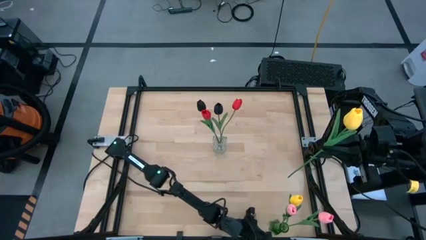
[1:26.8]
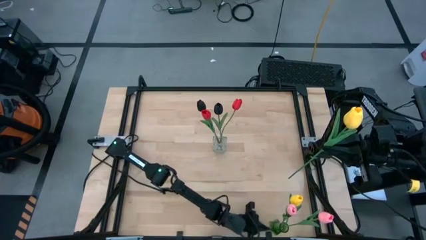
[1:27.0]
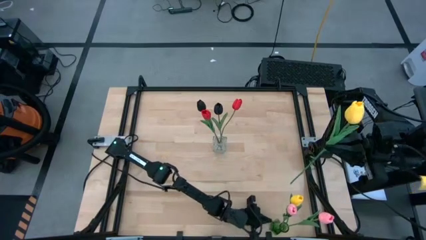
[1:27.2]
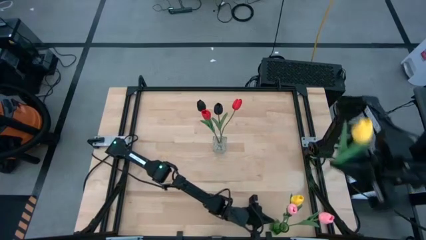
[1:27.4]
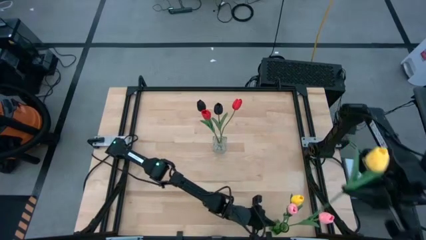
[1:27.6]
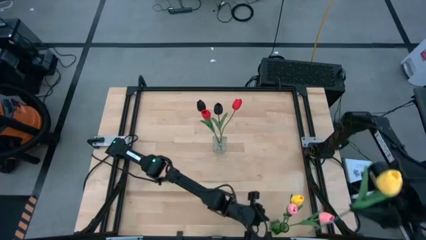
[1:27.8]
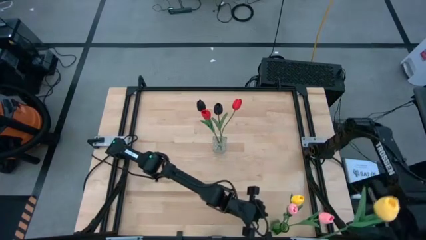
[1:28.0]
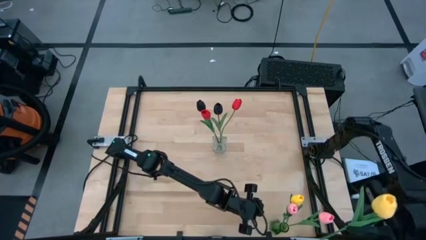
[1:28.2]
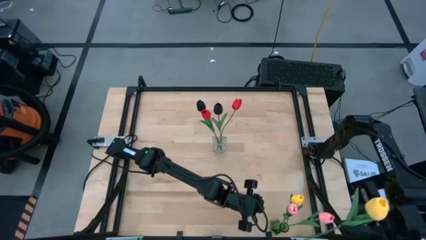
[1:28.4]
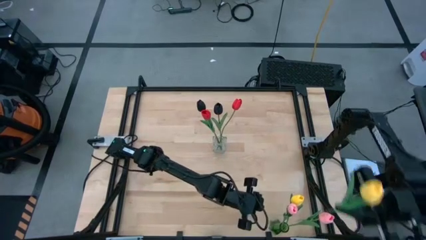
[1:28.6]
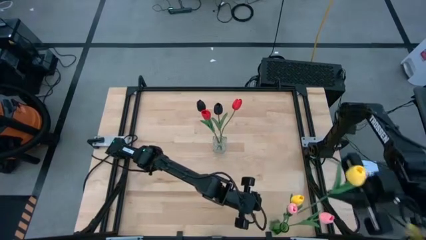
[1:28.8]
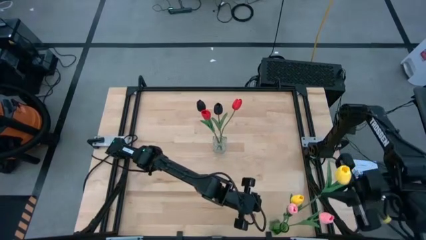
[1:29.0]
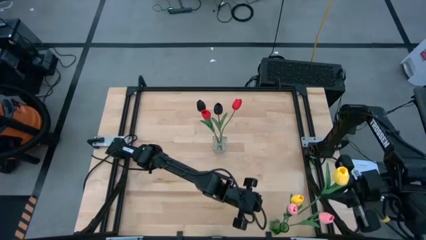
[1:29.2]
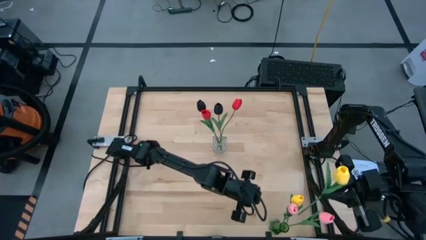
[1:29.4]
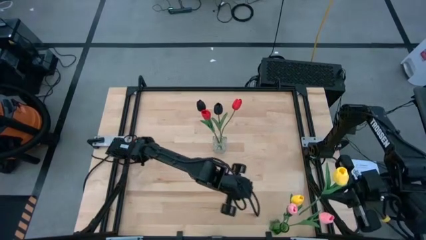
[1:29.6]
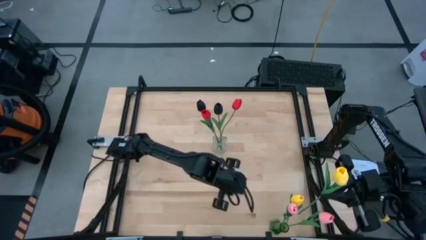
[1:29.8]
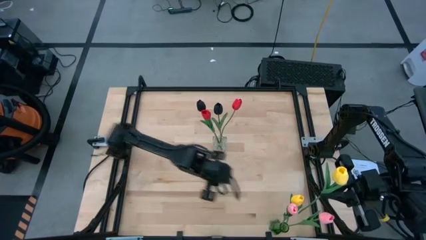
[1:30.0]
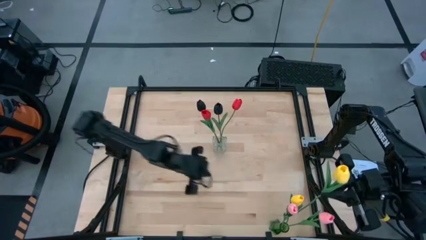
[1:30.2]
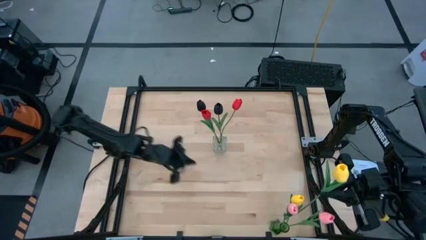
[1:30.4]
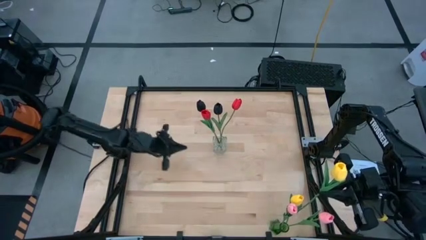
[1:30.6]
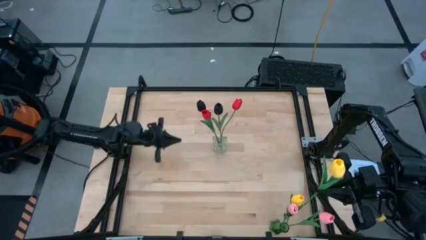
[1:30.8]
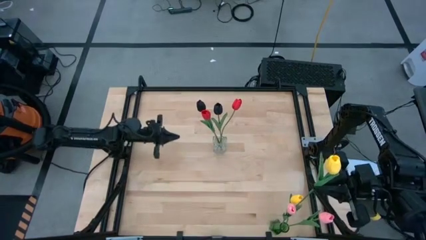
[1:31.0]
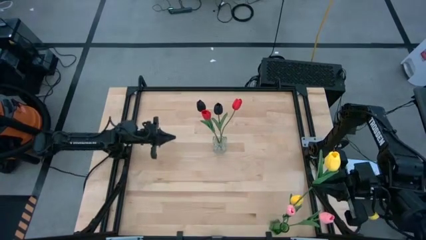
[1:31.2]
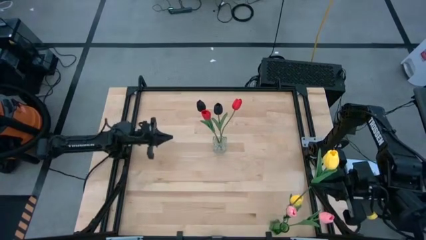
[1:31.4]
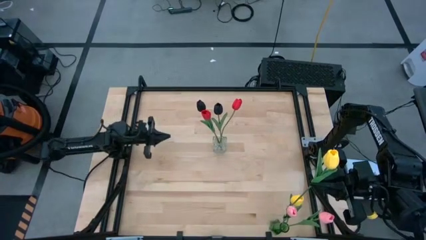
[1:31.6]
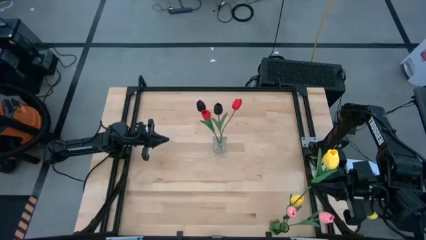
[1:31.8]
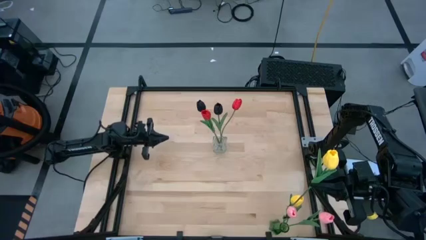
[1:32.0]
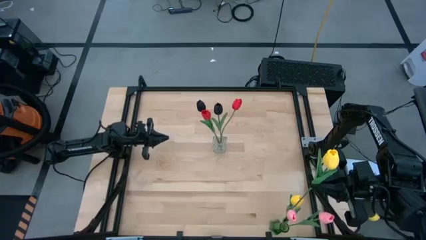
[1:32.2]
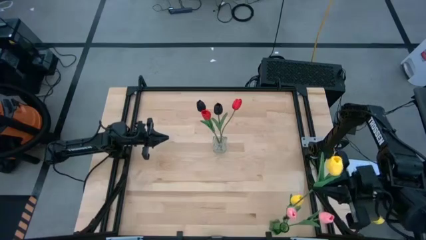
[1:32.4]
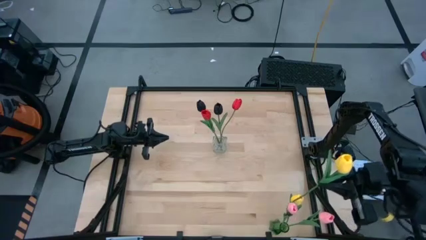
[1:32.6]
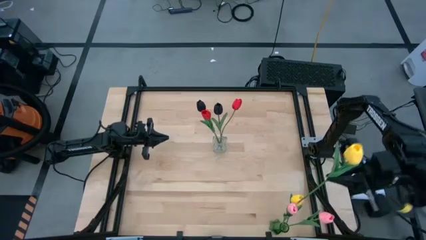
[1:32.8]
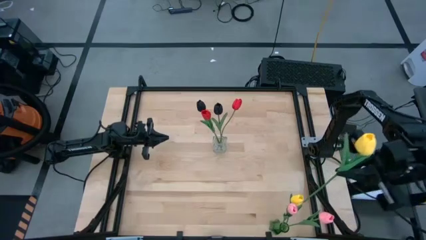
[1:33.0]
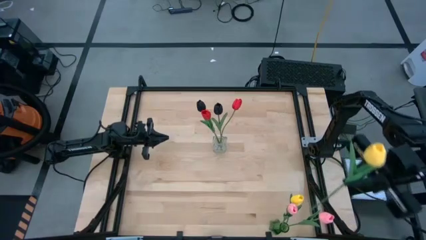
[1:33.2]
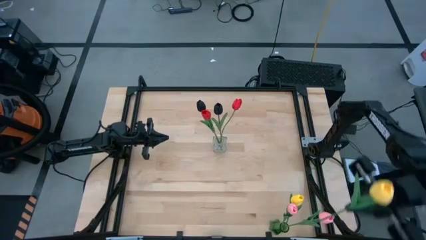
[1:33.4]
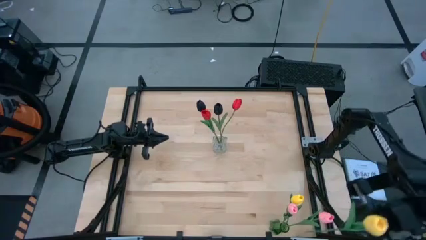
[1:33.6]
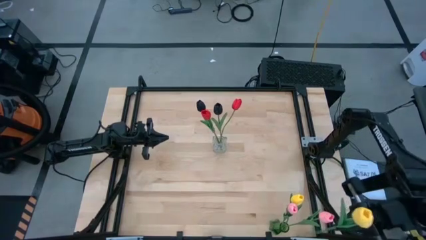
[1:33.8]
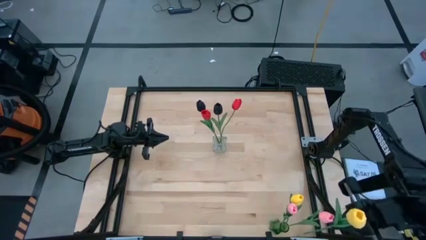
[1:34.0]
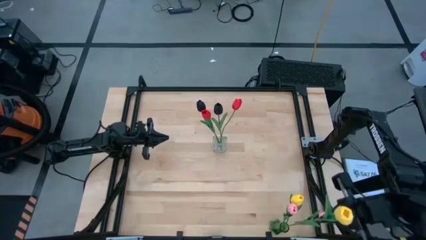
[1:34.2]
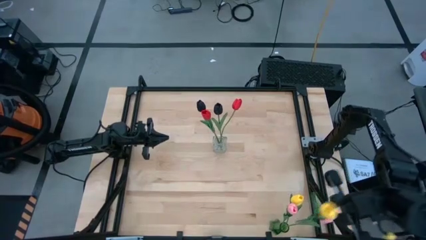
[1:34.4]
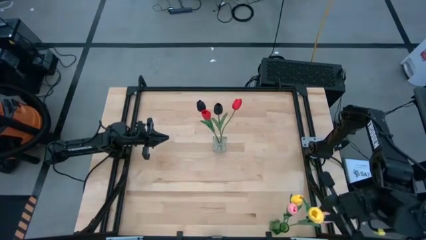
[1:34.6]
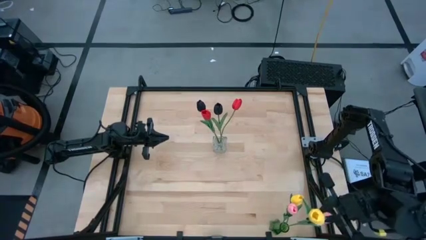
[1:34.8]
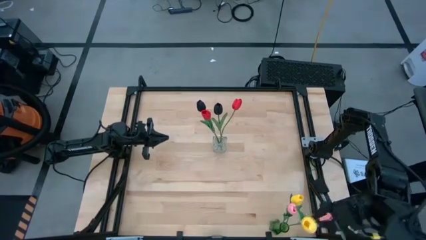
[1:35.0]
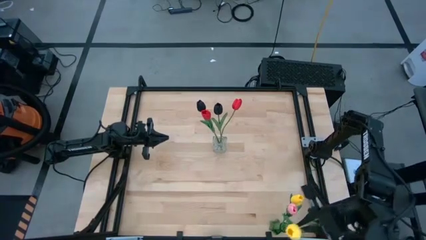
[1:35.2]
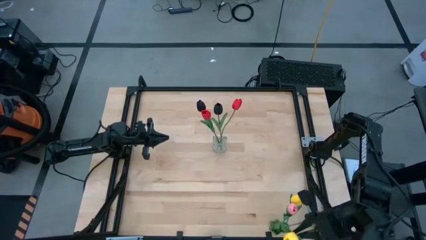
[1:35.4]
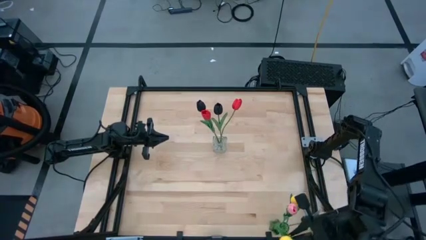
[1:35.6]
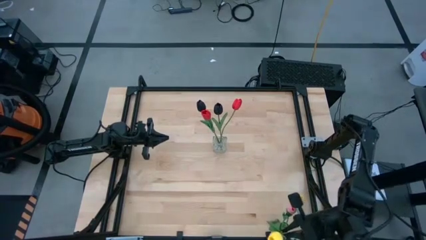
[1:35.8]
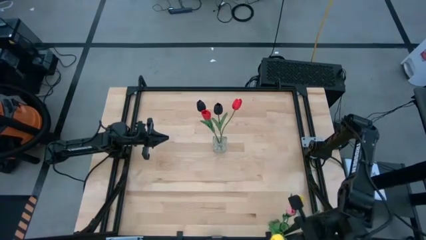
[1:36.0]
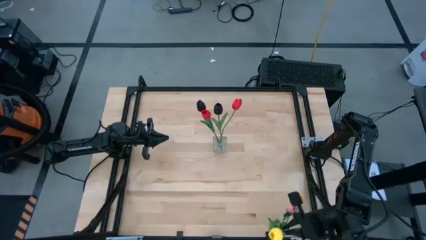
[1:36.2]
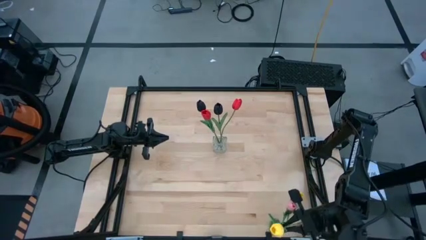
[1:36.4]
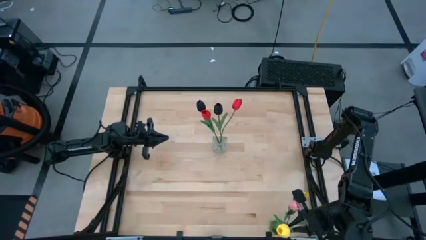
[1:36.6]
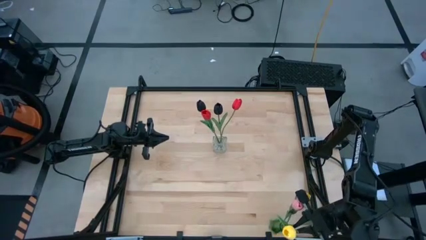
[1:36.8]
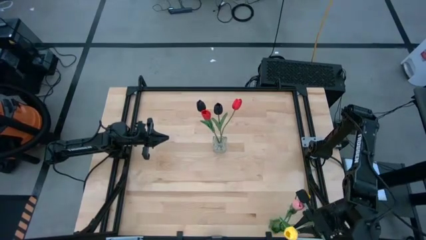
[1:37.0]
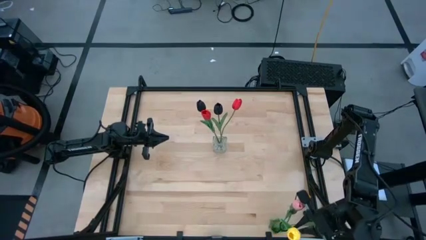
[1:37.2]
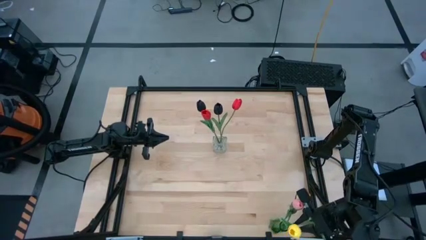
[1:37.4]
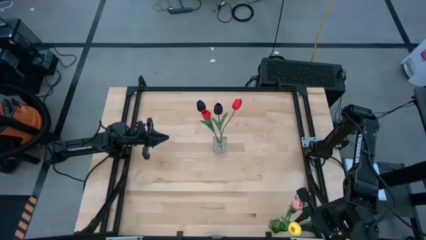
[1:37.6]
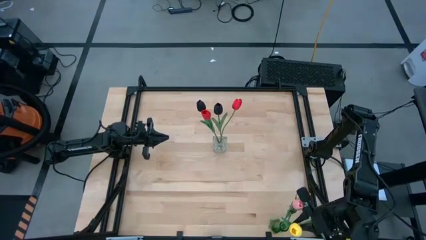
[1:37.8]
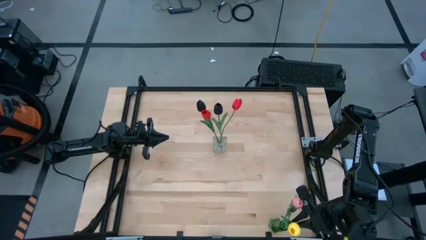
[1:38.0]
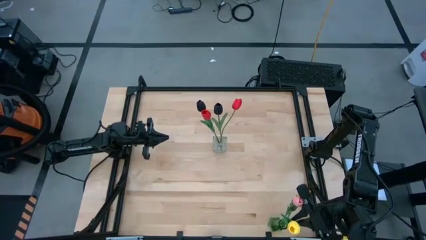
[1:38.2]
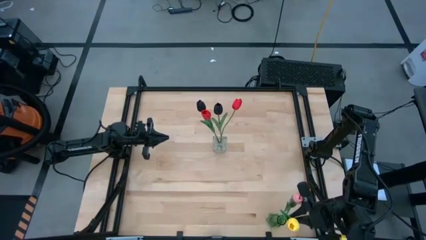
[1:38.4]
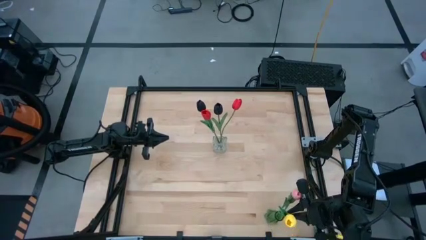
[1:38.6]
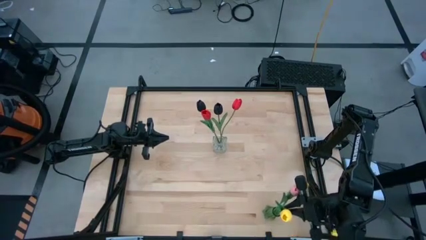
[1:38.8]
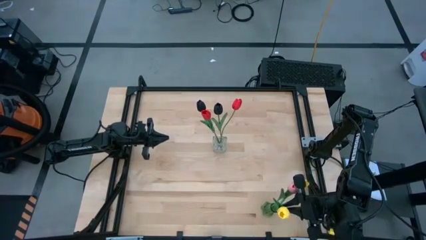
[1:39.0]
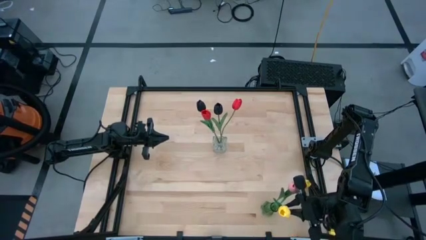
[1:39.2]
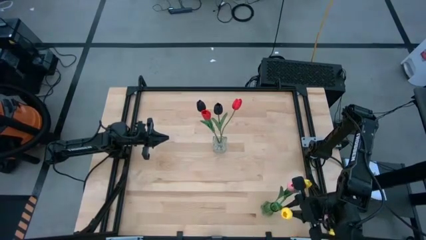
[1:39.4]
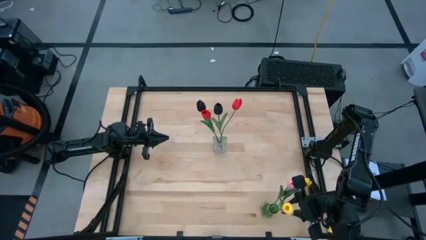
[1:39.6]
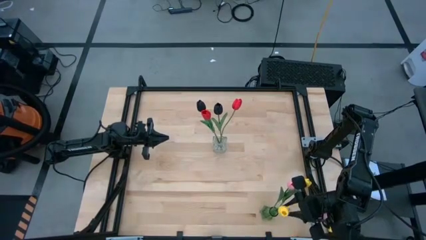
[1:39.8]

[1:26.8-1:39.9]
Task: Sort flowers into vase by color
Put the yellow flower into the green vase
